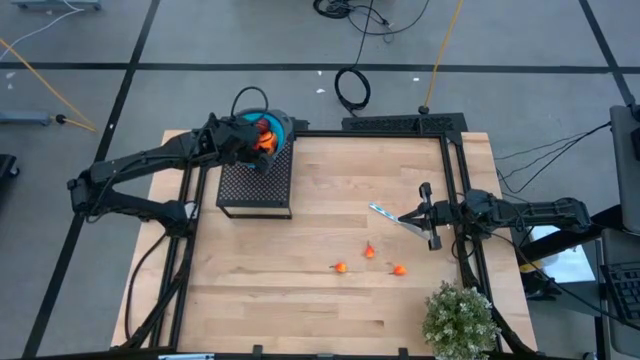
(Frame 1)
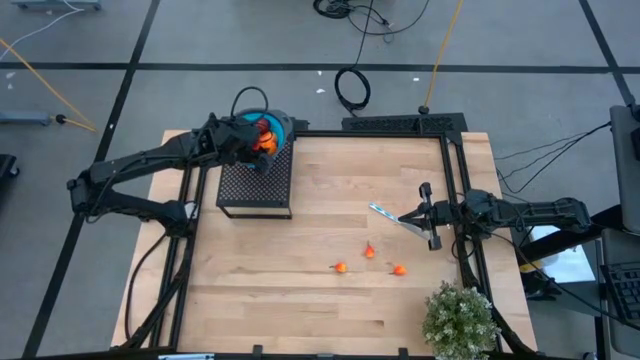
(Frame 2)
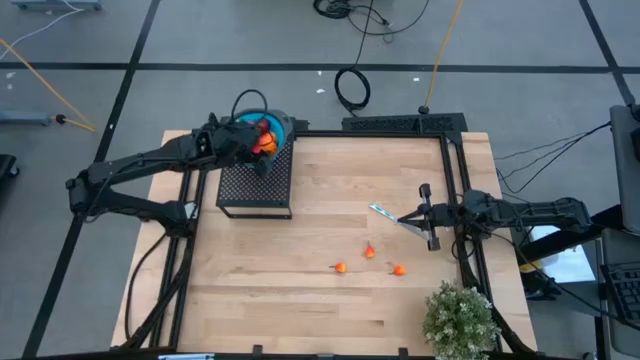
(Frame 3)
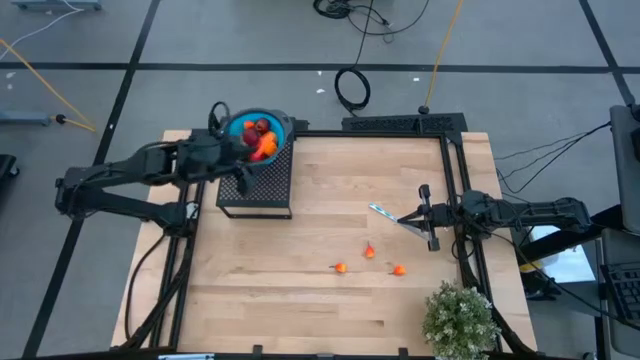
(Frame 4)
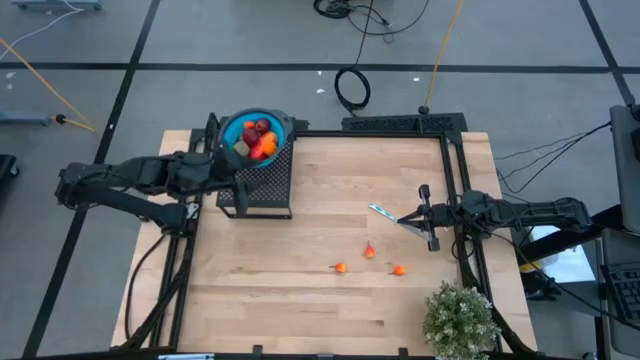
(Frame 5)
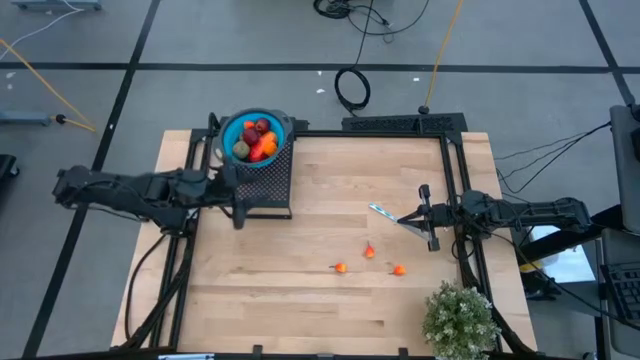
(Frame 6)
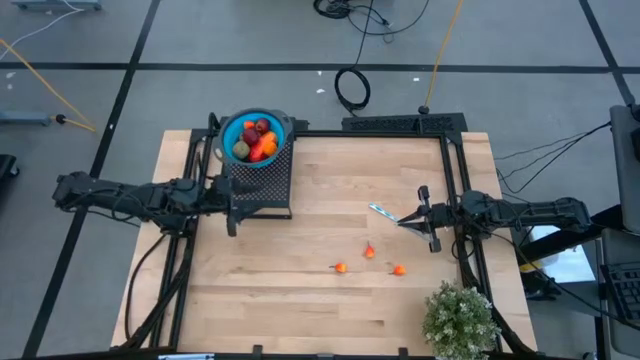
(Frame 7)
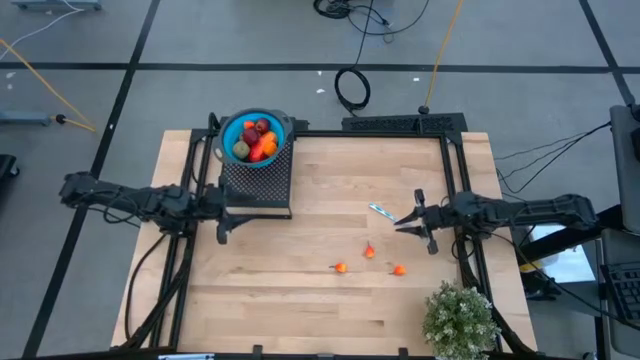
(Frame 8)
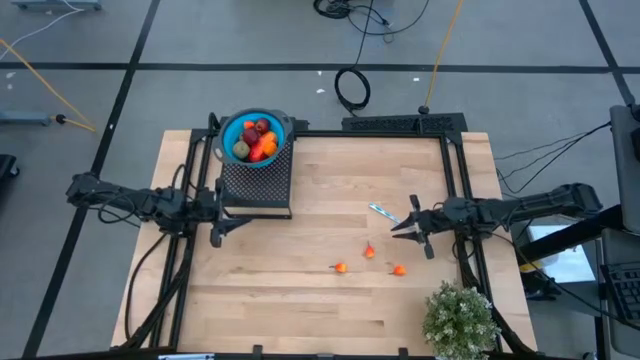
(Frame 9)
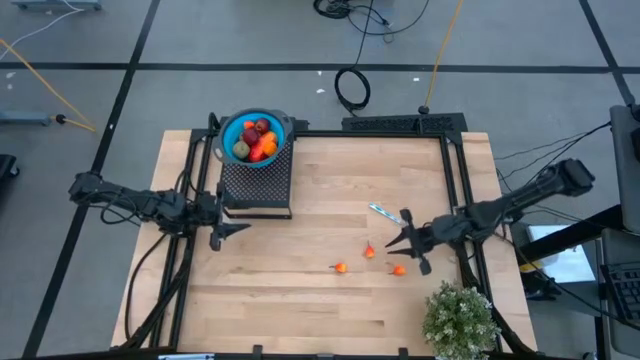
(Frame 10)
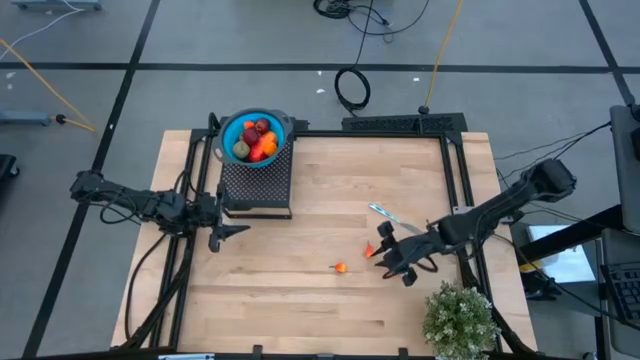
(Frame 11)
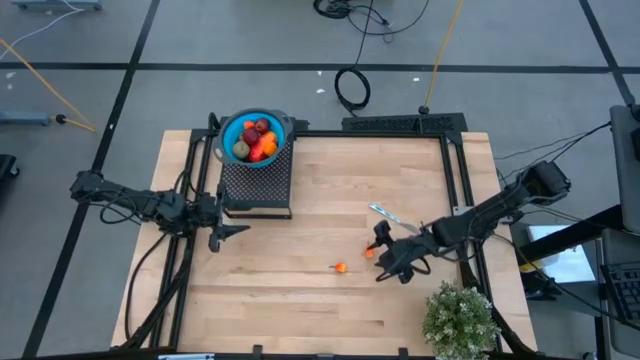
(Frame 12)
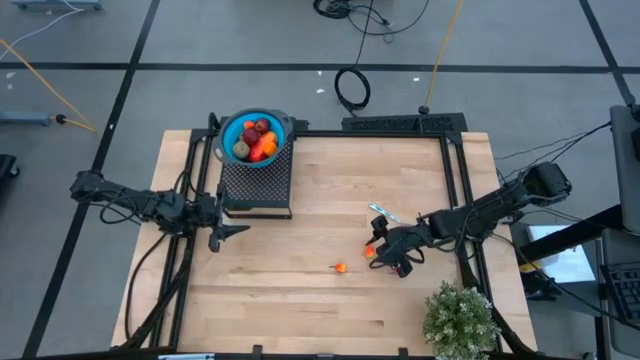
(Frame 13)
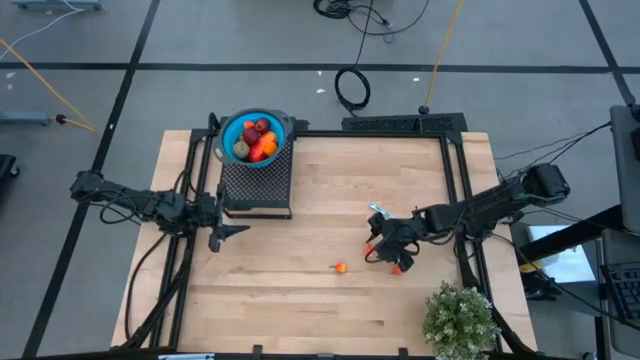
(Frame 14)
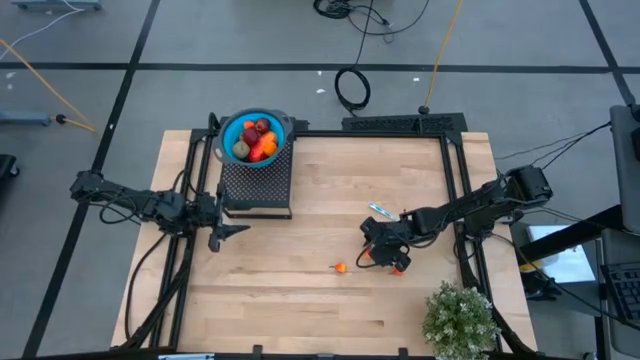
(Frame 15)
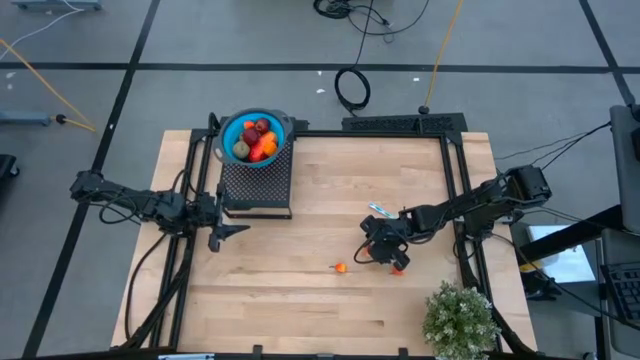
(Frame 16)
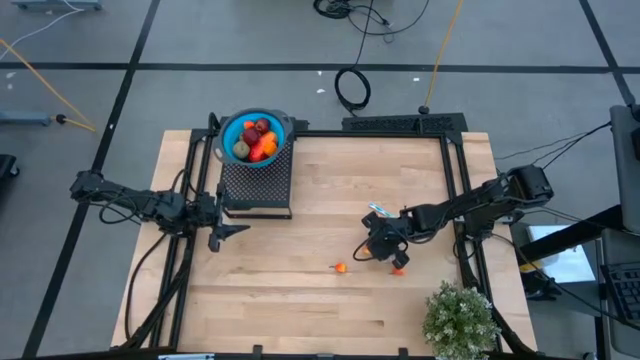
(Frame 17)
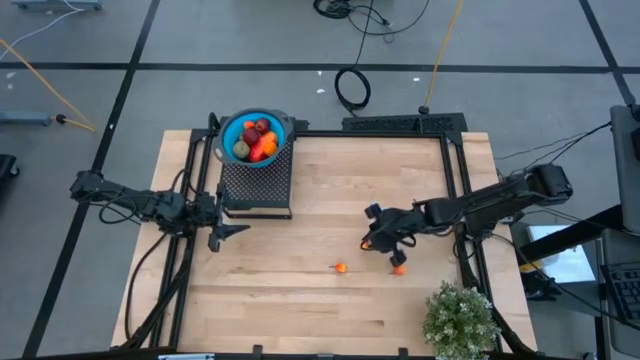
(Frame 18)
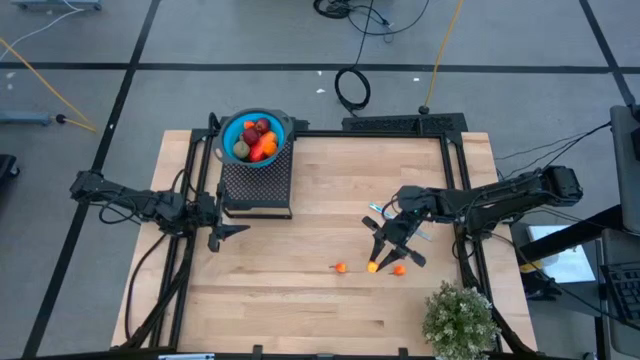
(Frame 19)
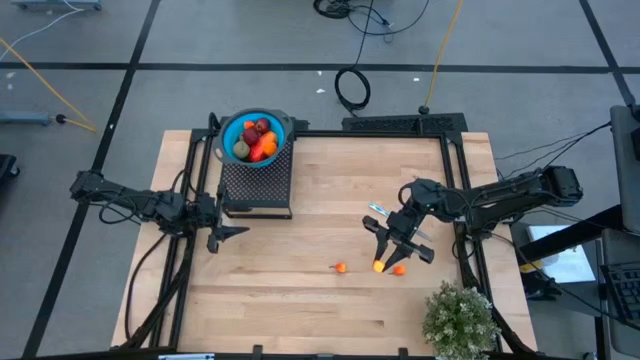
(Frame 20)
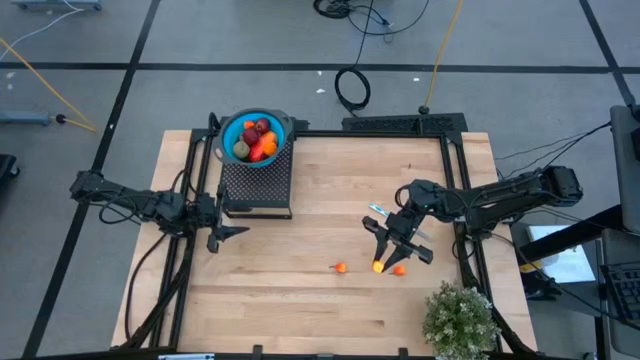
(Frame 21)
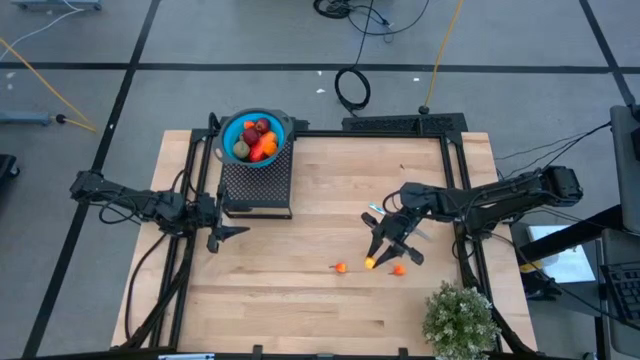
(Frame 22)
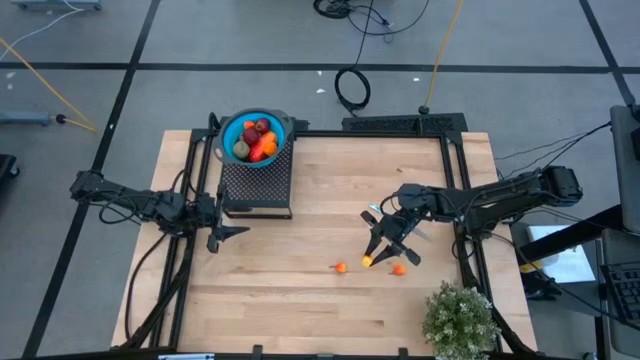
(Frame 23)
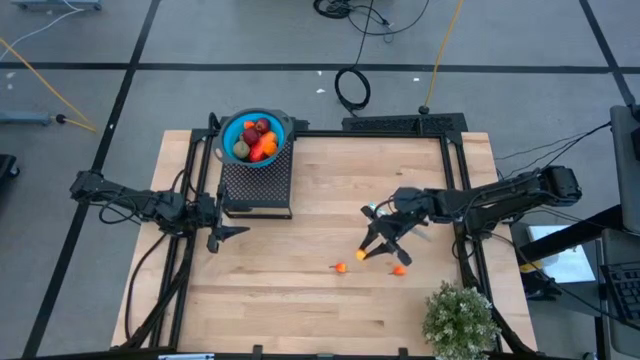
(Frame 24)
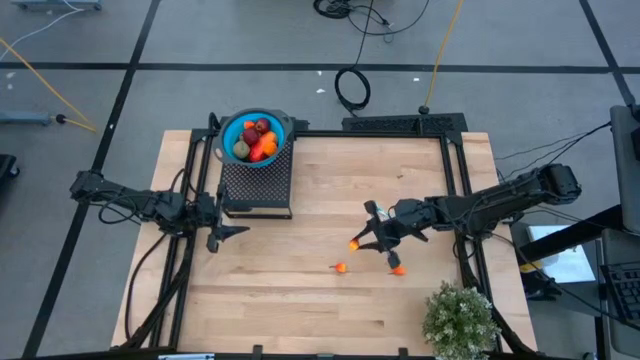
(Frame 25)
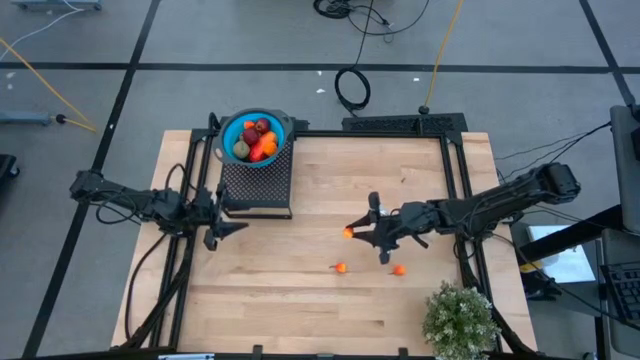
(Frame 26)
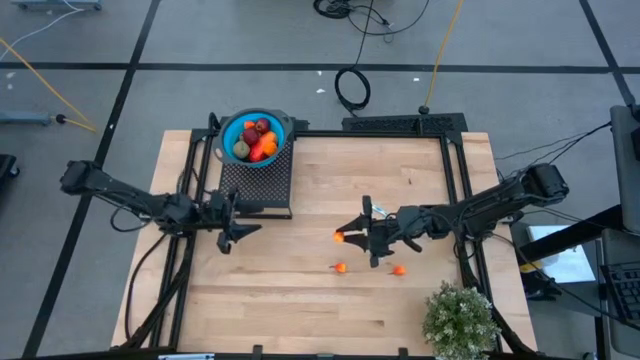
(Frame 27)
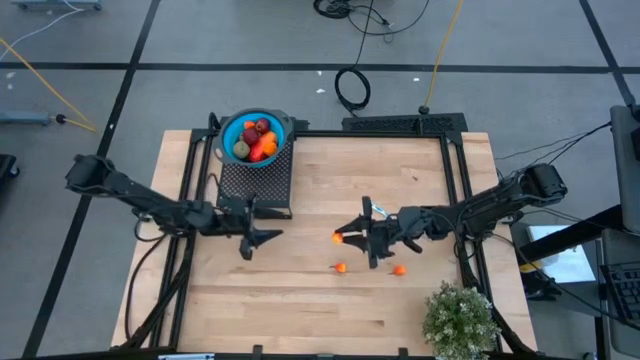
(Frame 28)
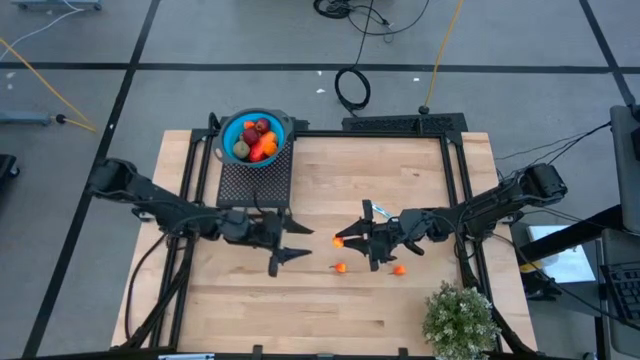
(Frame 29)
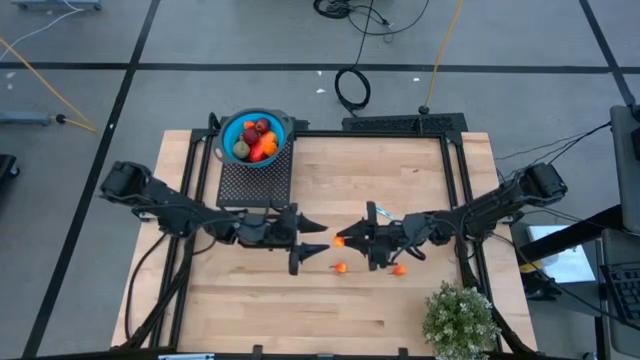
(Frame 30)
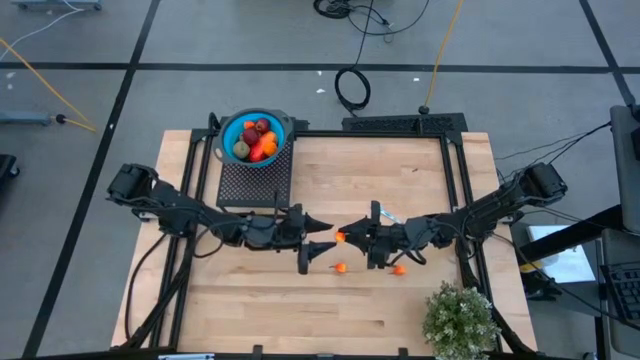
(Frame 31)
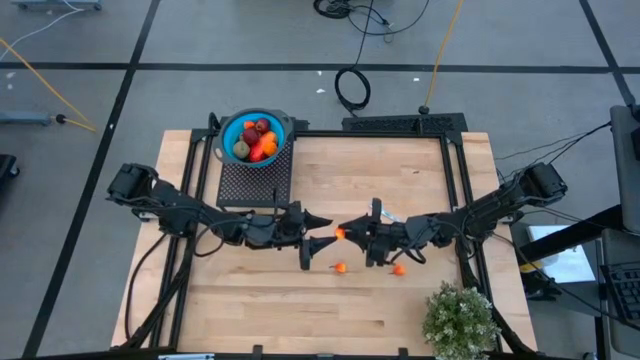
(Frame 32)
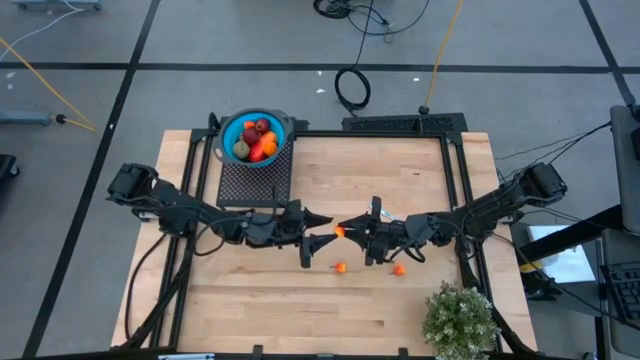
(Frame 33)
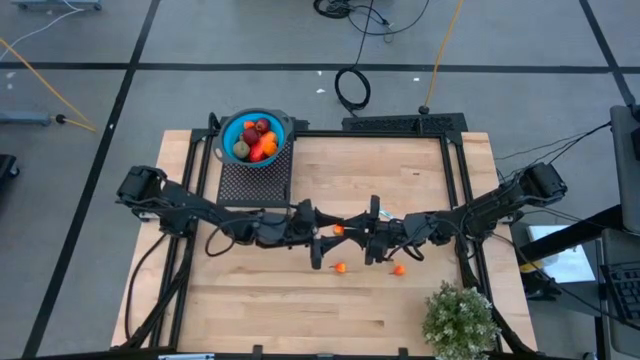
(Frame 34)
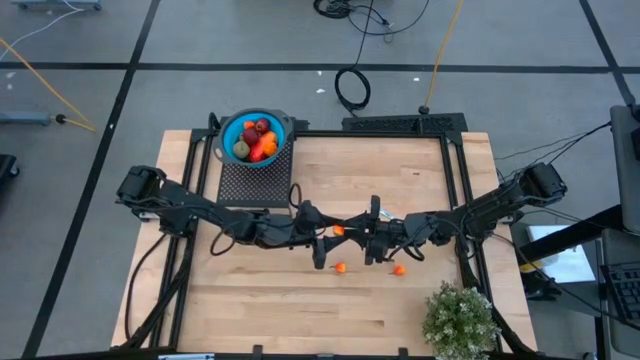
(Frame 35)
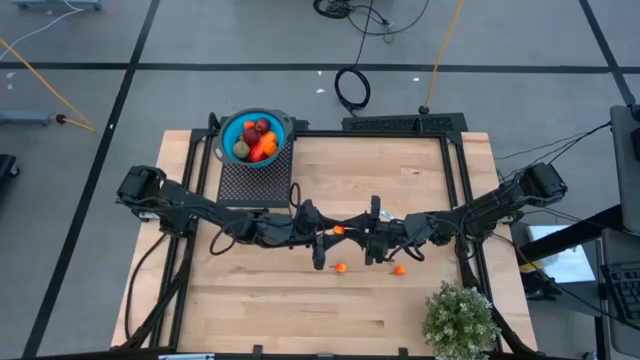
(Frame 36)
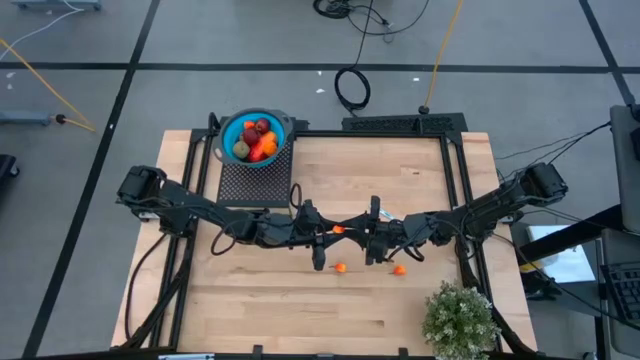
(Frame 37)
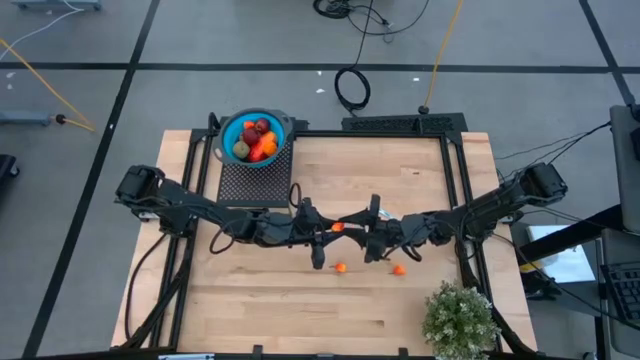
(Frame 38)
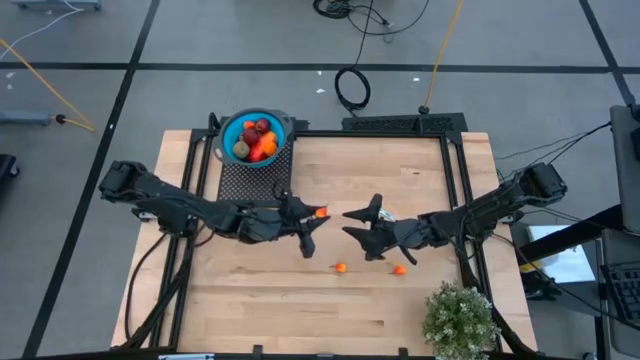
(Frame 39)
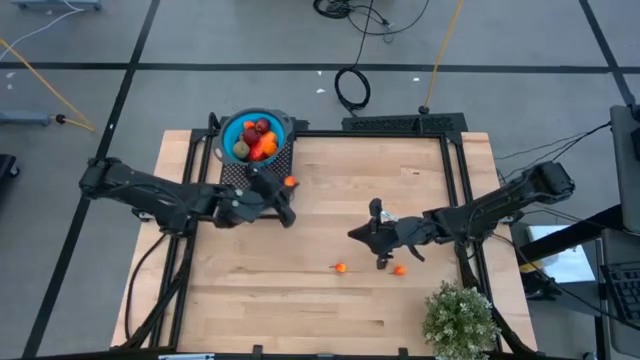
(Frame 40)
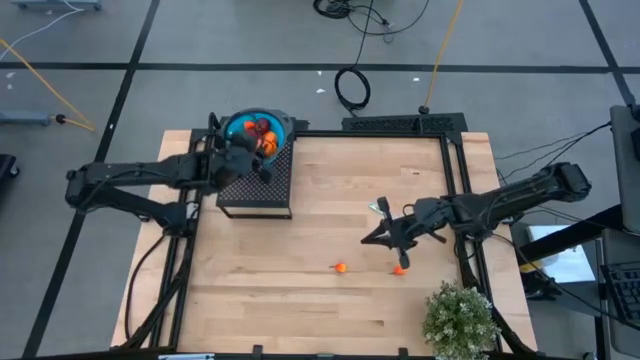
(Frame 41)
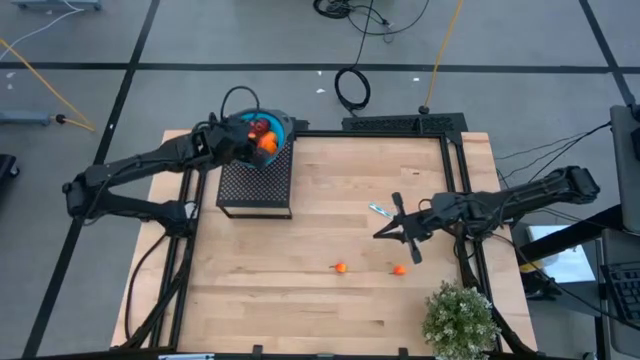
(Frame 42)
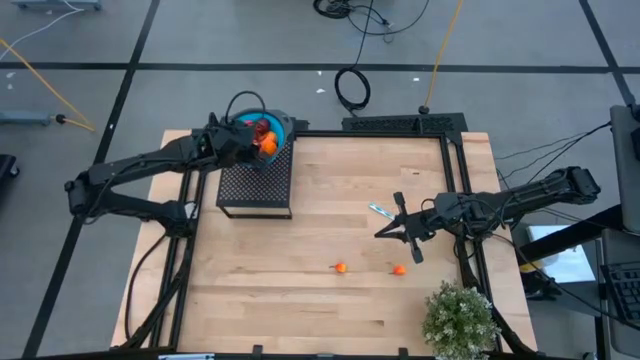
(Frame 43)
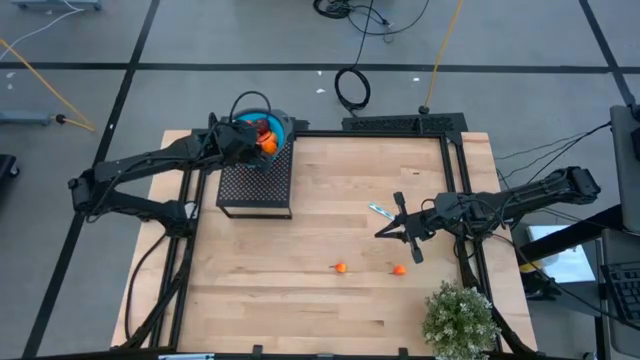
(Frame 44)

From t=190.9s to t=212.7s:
Task: Pick & Place Fruit
Put the yellow pear into the blue strainer bowl on the shelf
